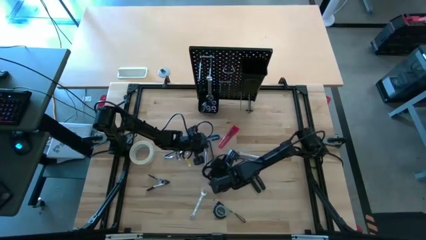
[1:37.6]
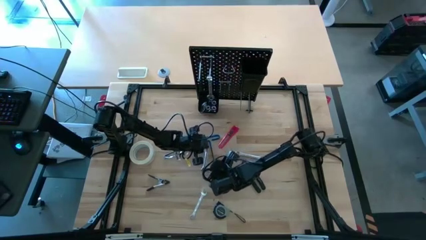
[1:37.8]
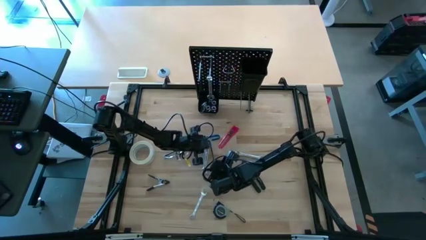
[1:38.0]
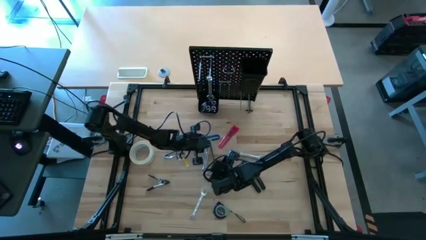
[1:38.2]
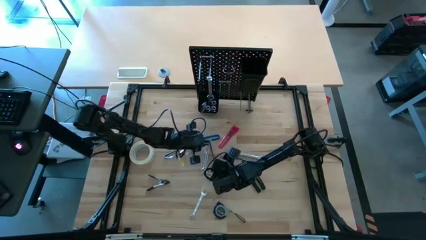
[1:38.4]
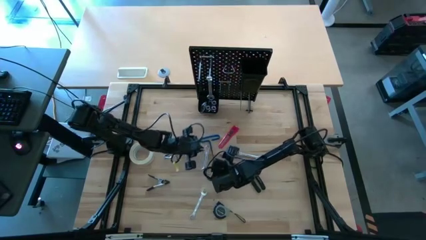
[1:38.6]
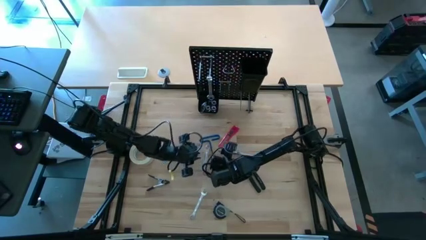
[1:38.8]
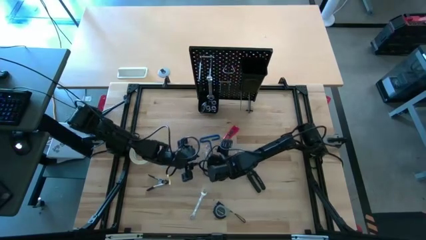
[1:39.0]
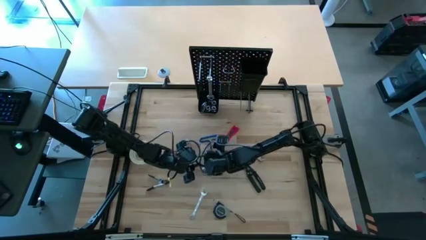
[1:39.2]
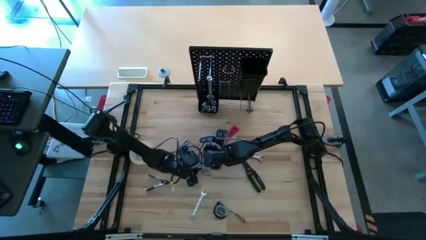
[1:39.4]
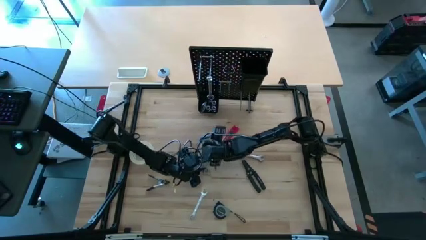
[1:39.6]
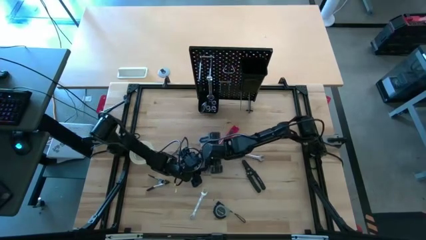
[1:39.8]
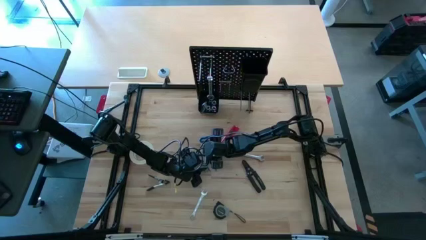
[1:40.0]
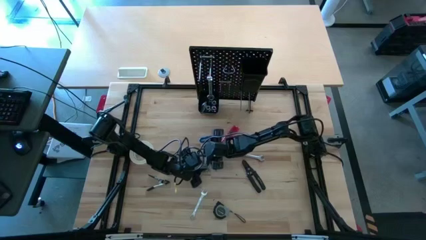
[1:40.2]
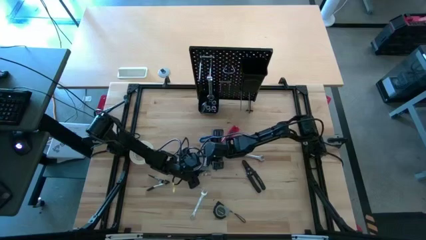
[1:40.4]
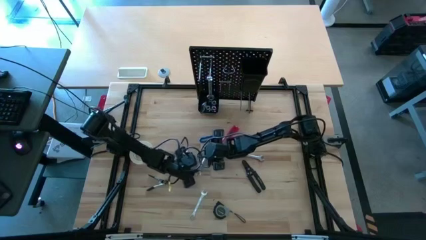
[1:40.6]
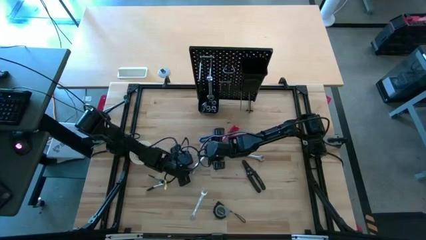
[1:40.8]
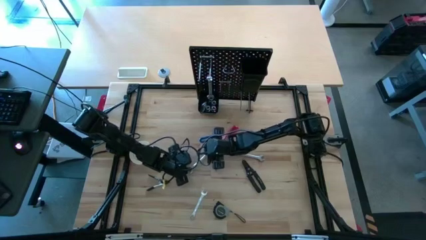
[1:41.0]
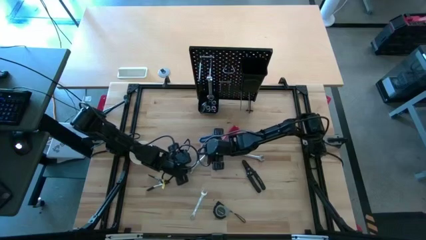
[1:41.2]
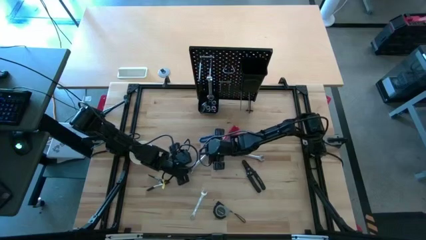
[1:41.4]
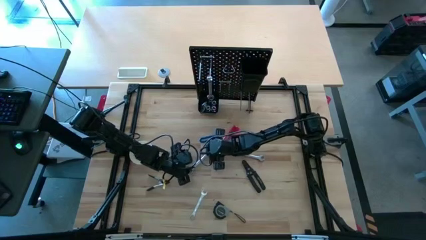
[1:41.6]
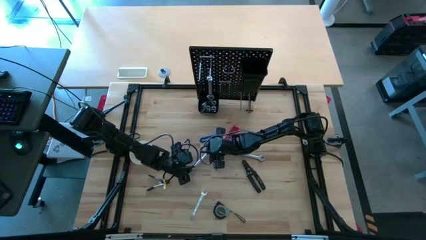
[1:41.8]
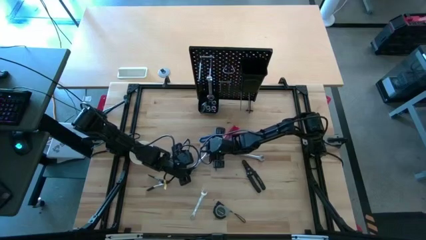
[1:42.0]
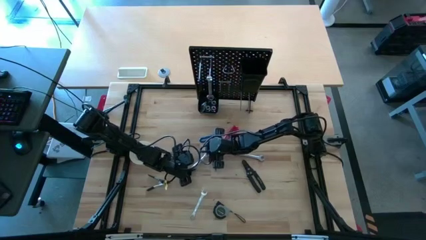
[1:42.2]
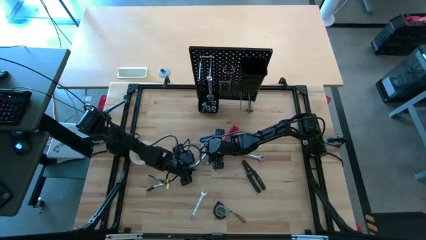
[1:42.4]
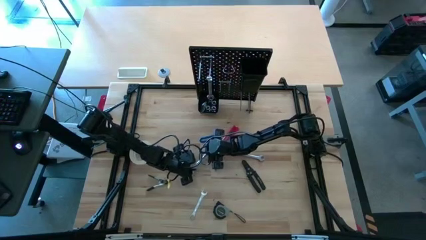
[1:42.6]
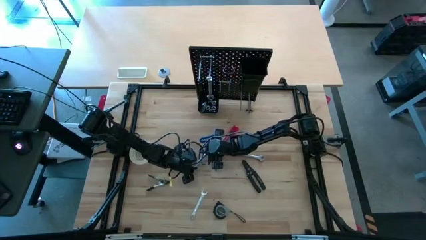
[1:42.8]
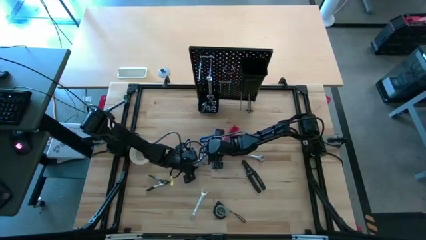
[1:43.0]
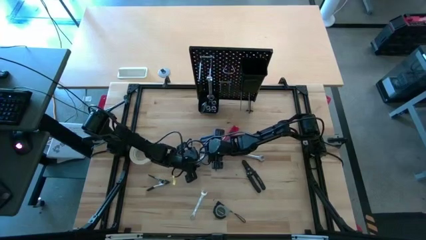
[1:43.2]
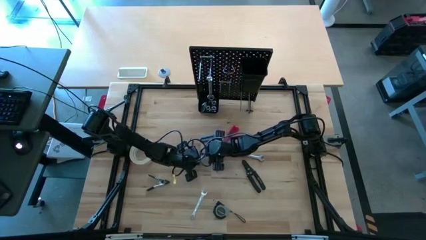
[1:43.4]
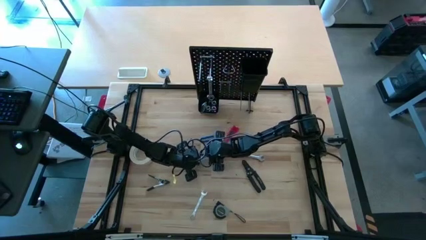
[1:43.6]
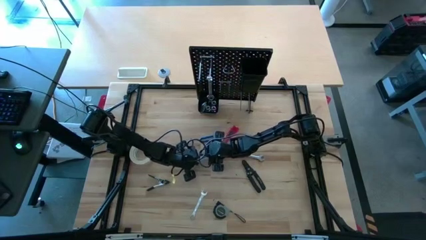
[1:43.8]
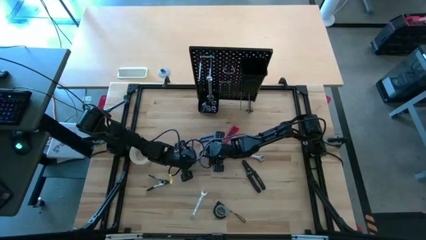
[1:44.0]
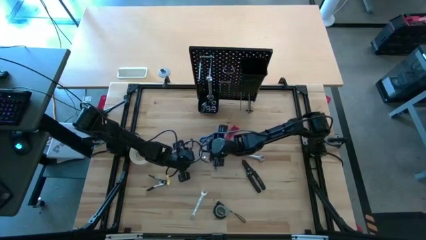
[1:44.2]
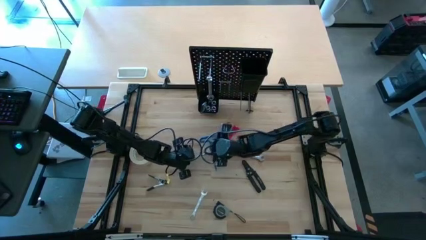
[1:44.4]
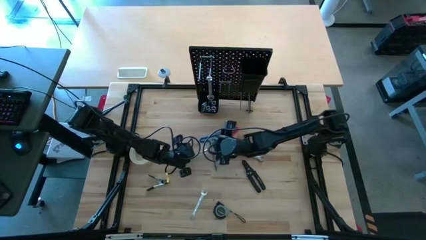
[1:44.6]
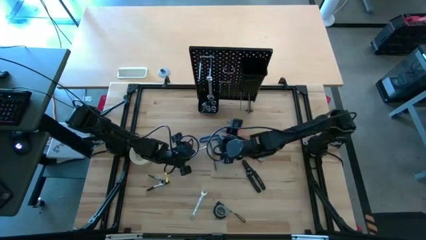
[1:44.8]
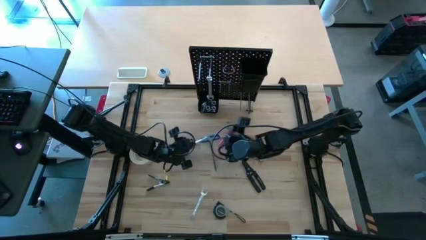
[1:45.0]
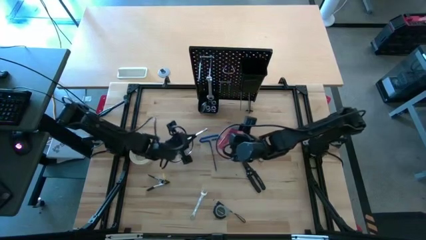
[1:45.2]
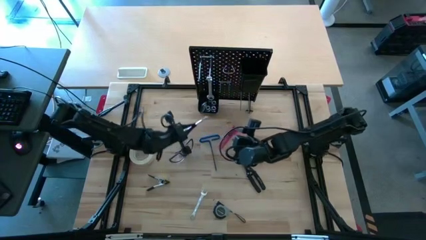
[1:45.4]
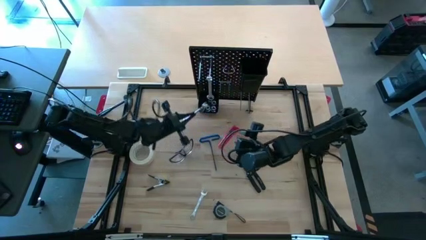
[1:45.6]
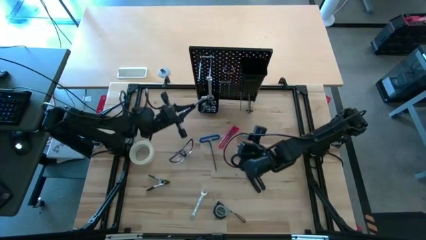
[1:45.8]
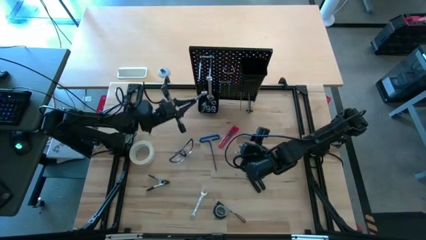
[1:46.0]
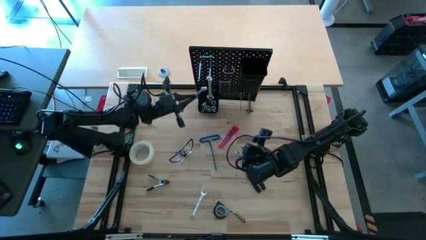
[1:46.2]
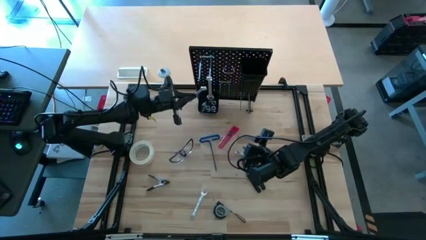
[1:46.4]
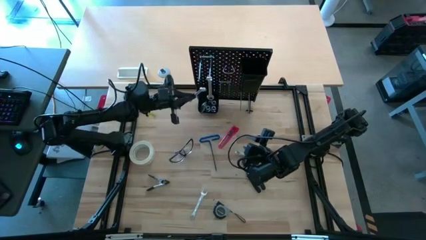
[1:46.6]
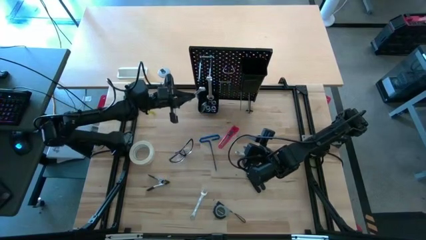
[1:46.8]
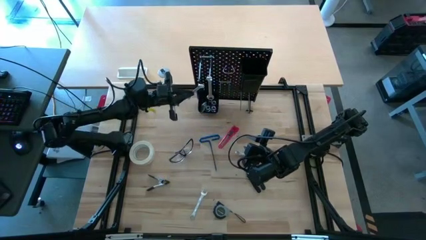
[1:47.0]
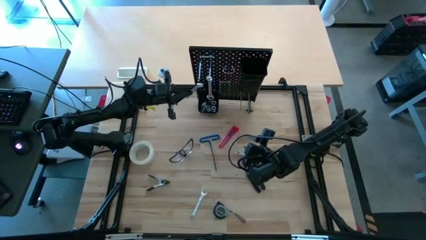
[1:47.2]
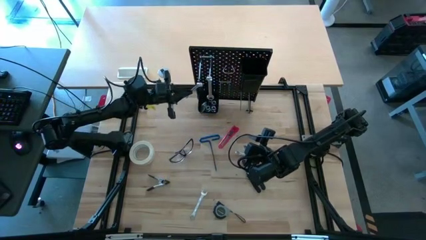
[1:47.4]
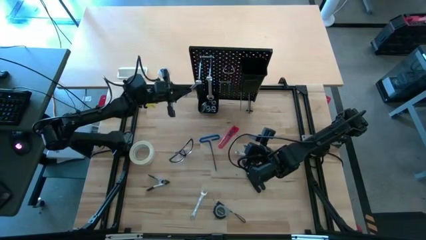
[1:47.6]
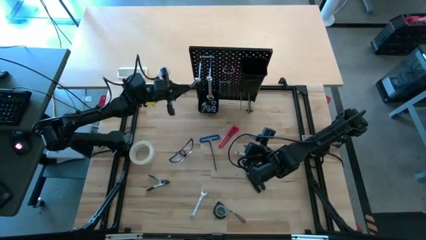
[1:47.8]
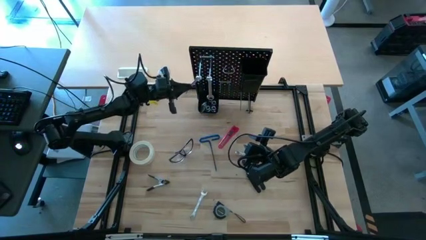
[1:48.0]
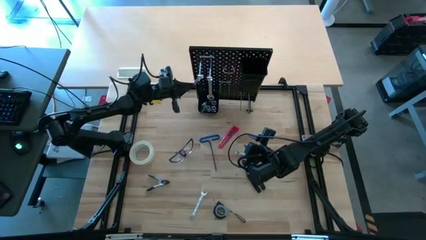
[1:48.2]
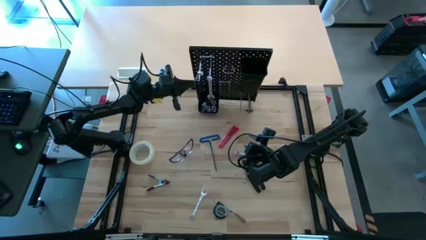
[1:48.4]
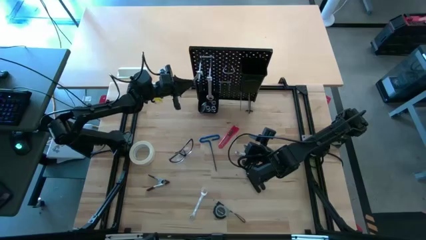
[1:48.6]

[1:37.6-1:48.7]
Task: Hang tools onto peg board
Hang the bottom left wrench onto the peg board

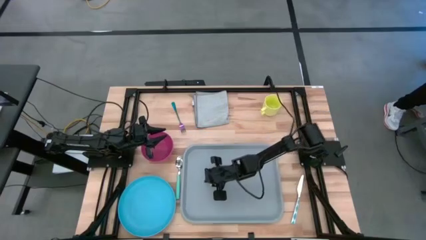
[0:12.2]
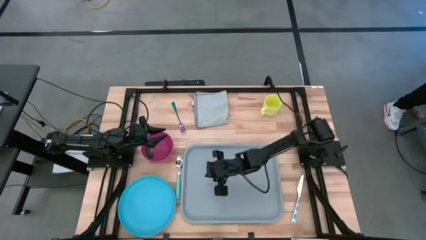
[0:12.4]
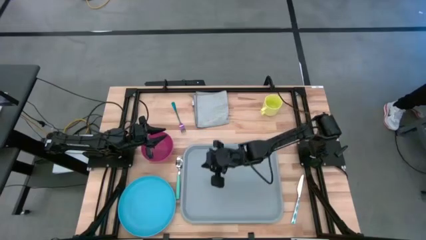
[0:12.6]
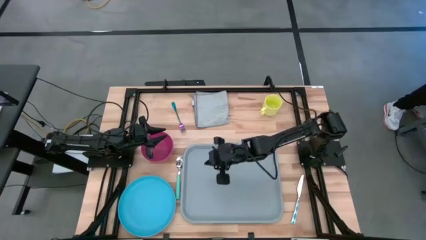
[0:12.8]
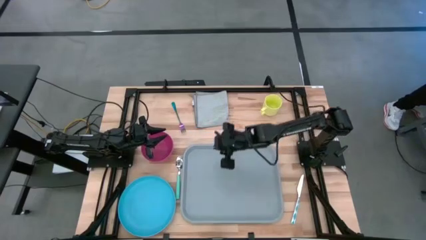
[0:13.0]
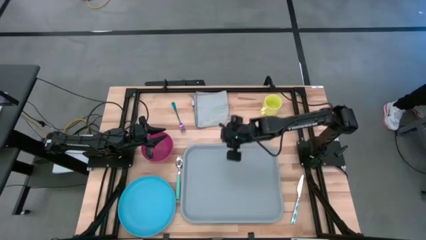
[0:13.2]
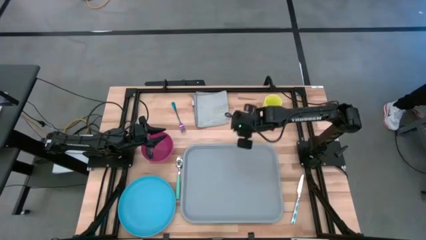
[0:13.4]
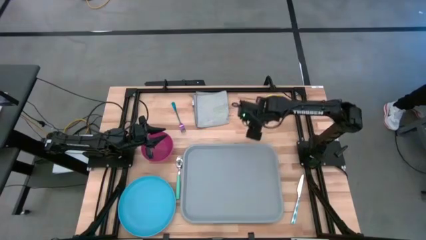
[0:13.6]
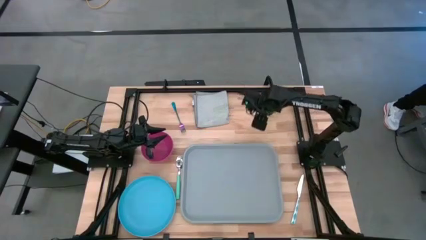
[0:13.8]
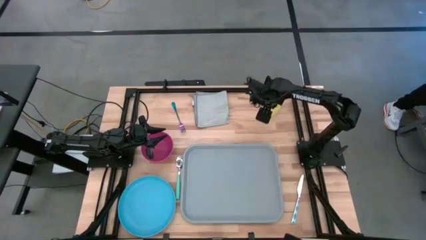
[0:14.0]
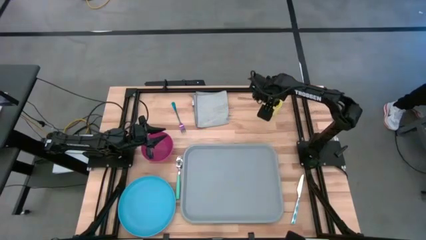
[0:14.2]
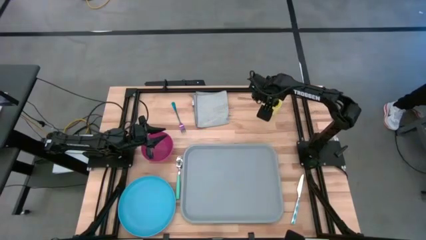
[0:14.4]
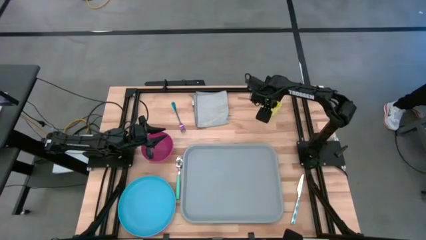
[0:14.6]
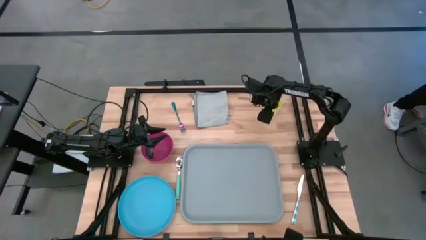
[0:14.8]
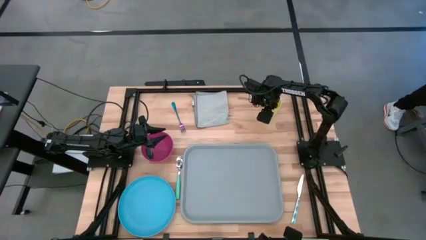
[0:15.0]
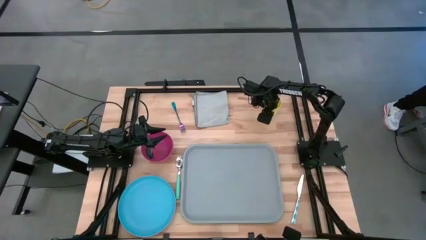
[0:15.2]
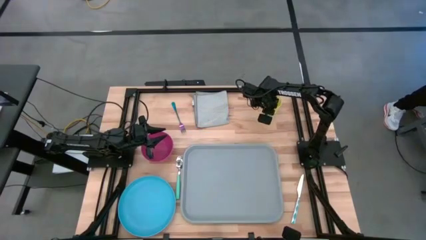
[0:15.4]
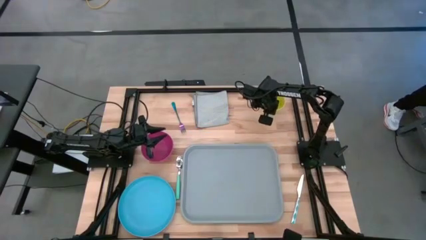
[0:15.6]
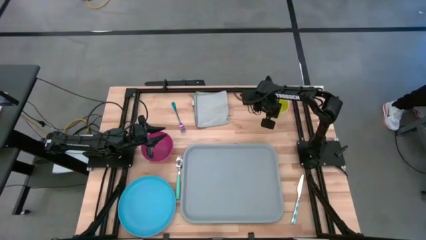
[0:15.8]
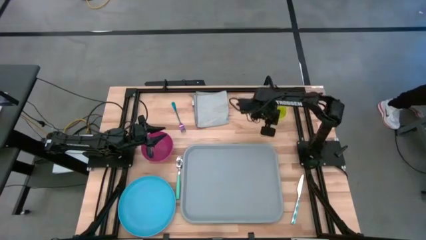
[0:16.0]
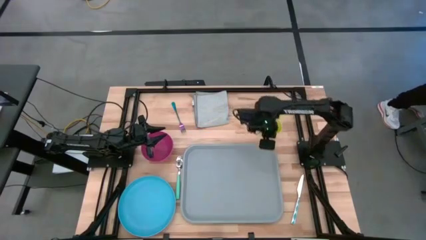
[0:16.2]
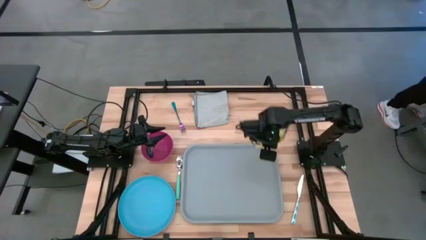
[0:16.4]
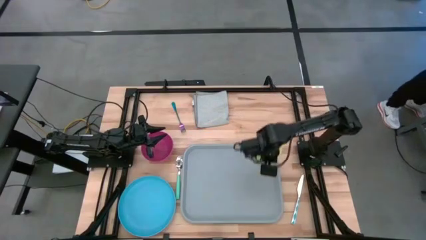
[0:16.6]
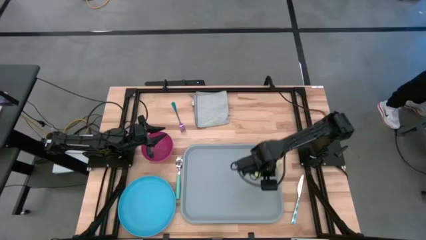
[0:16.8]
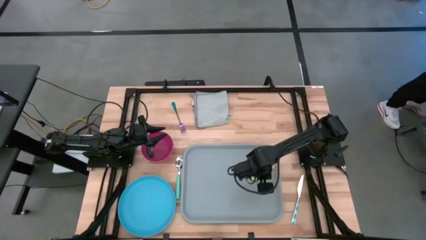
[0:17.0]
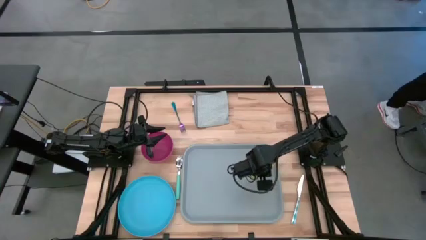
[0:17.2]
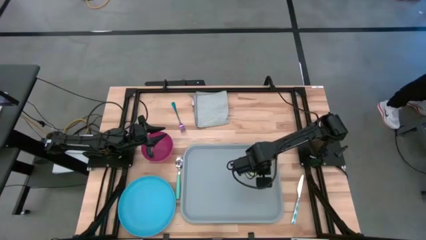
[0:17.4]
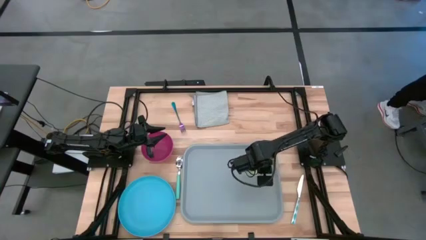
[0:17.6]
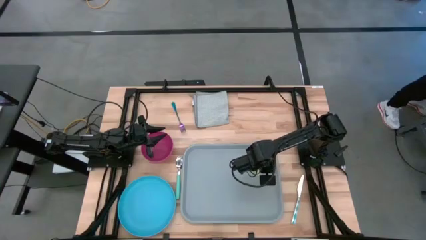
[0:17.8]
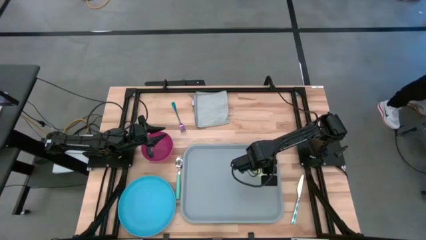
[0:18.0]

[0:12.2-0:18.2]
Task: Set up tray
Put the yellow mug in the top right corner of the gray tray
